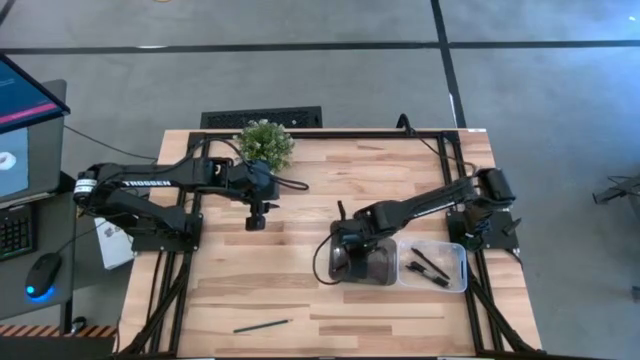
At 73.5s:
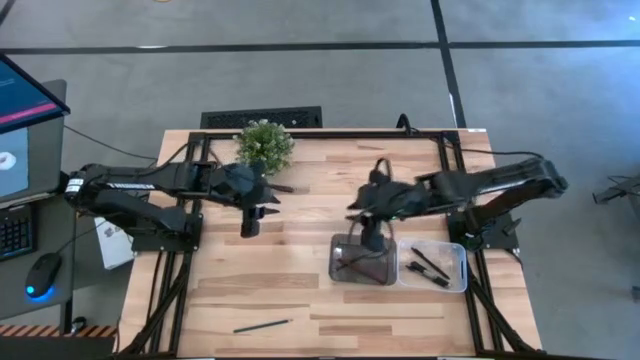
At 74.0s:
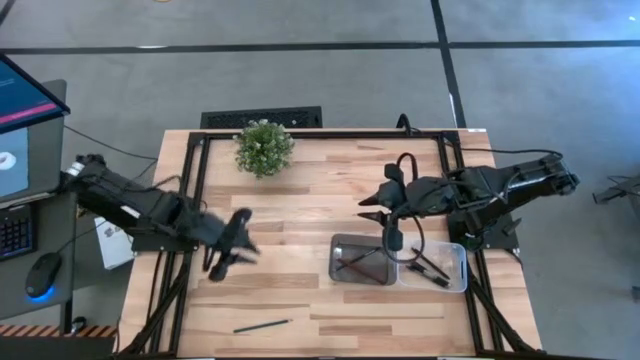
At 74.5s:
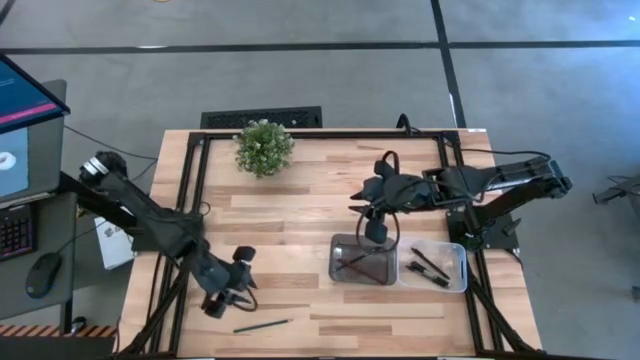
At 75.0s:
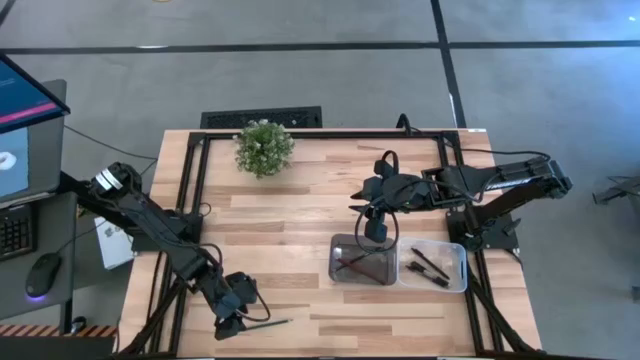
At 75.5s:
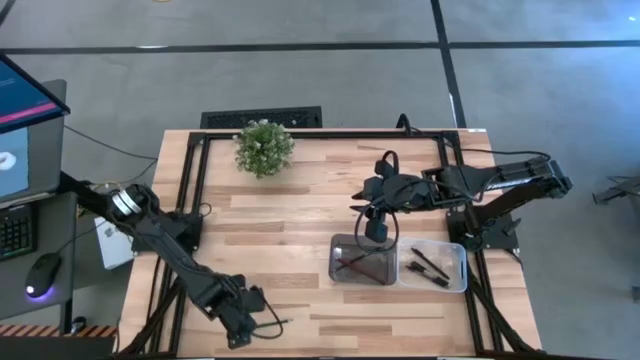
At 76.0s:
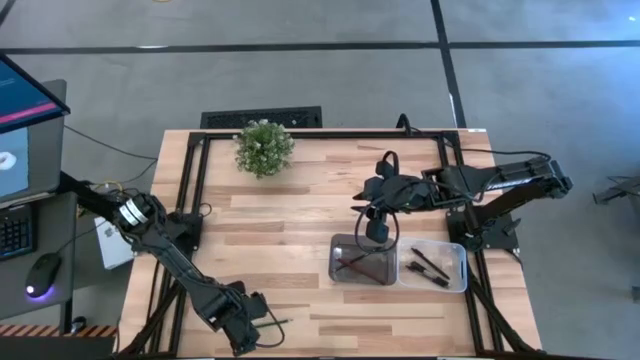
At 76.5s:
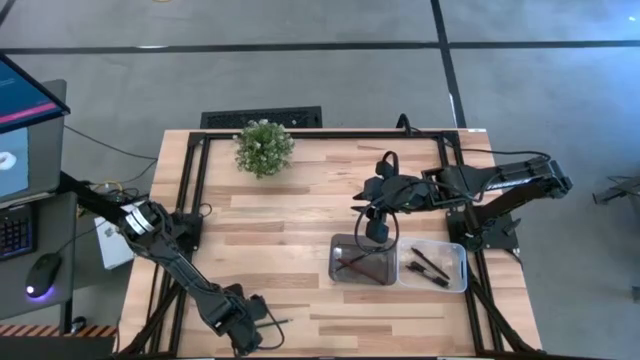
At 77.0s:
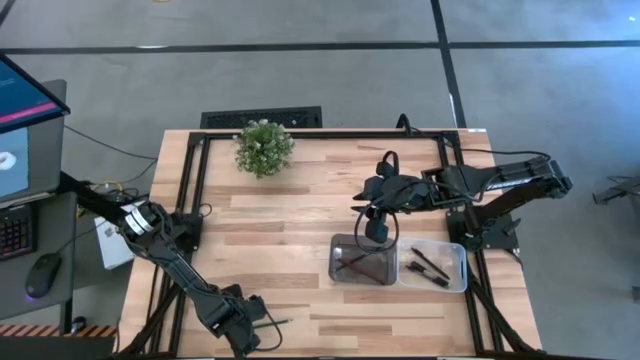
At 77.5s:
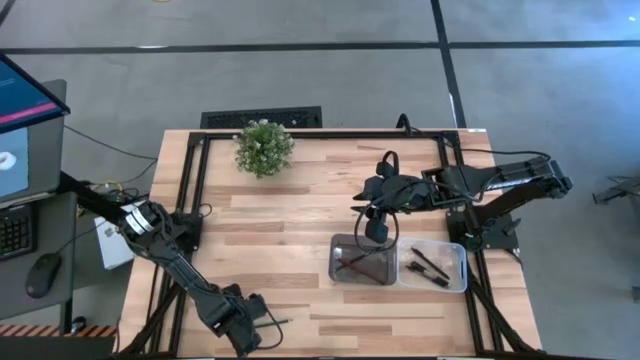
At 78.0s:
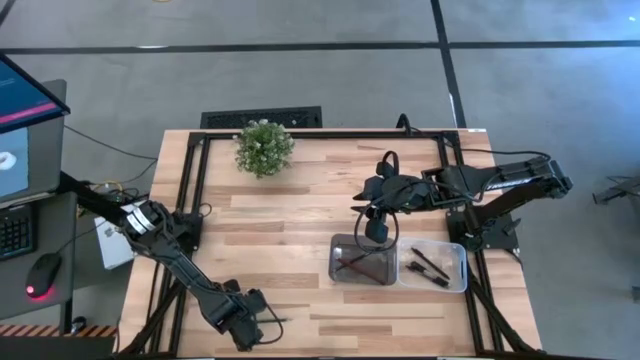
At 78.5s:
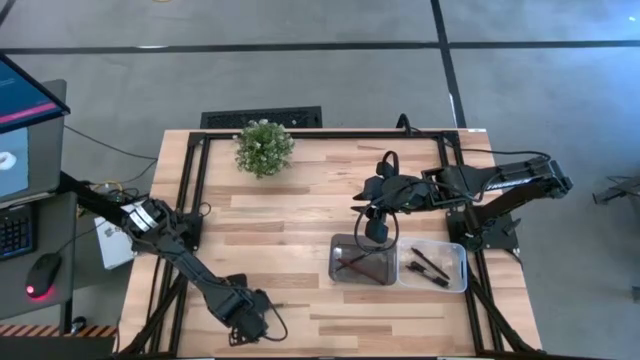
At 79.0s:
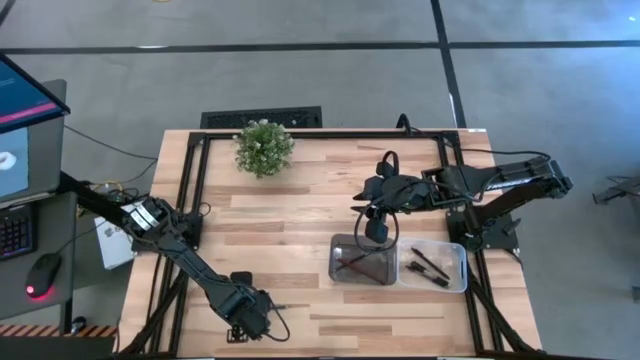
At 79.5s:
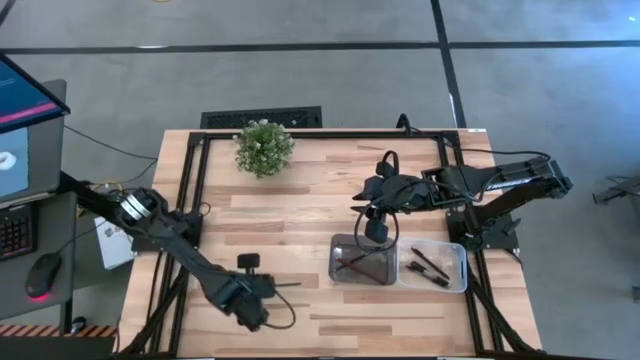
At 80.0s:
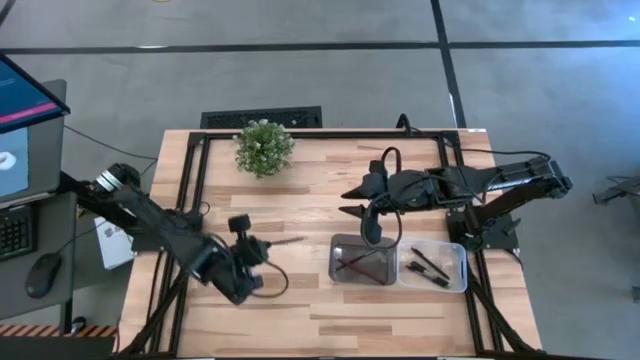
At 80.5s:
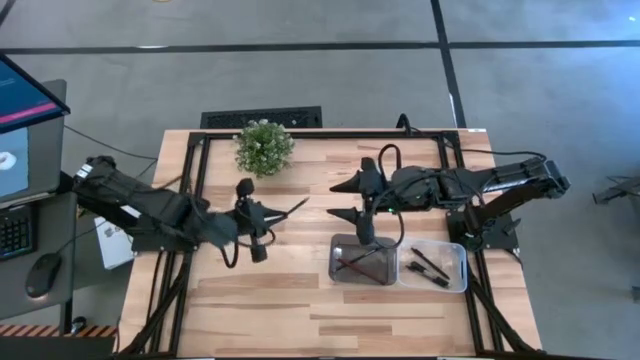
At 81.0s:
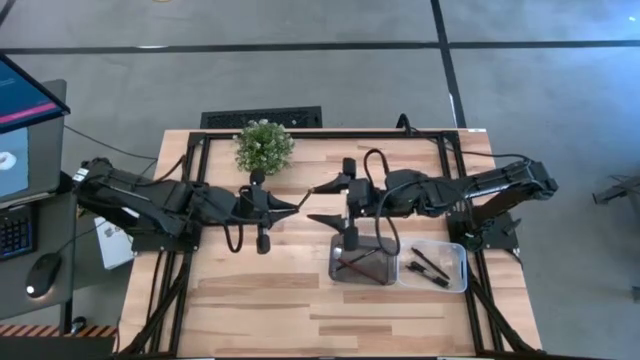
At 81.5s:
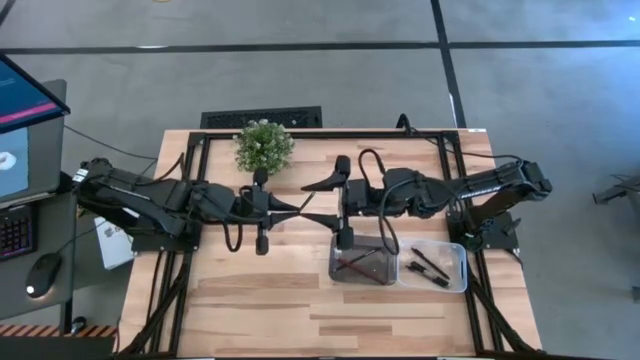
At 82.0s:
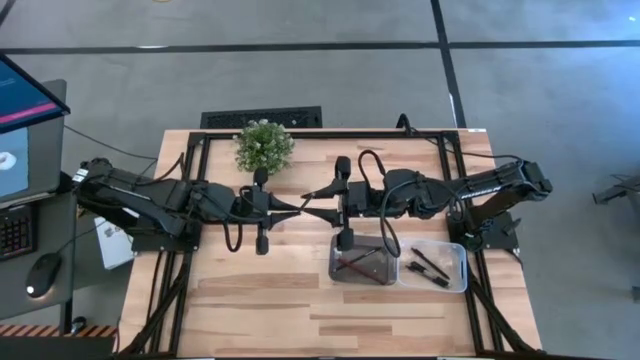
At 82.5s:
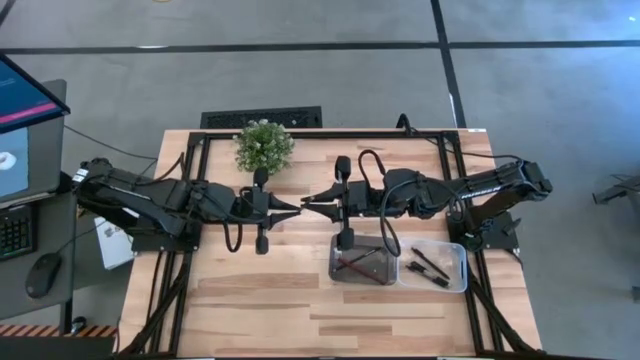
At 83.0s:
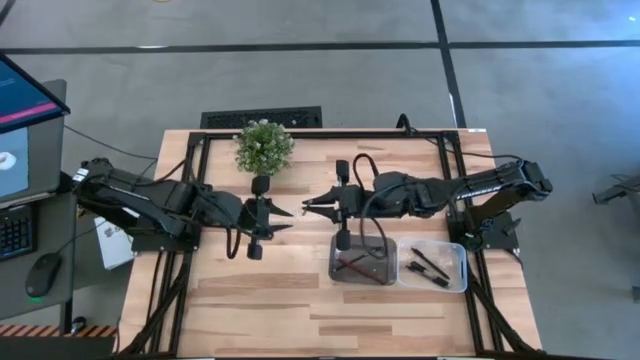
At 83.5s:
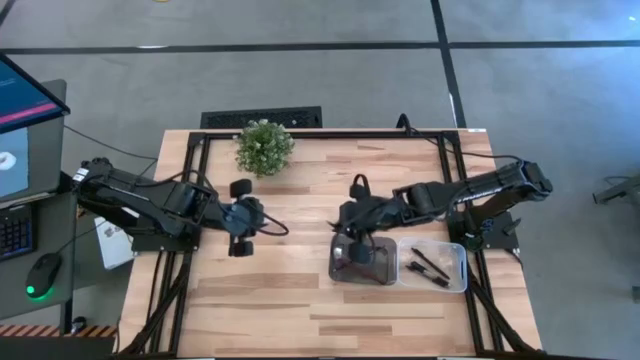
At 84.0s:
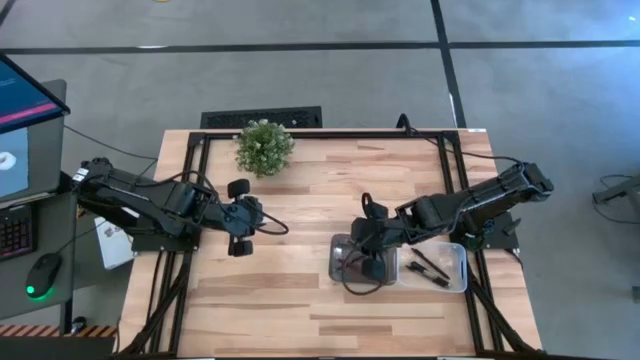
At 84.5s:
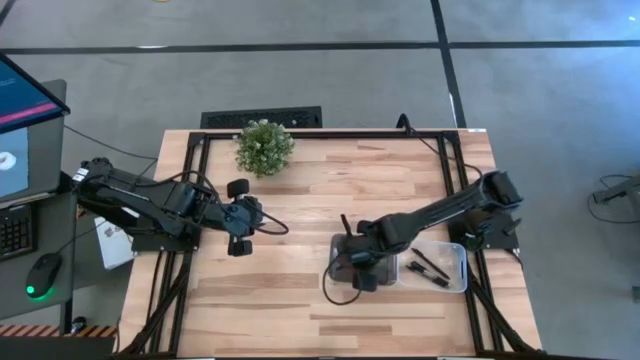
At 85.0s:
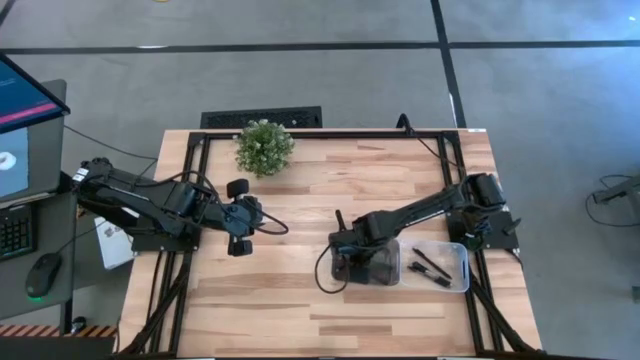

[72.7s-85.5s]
Task: Sort pens & pencils
Put the green pencil into the black bin

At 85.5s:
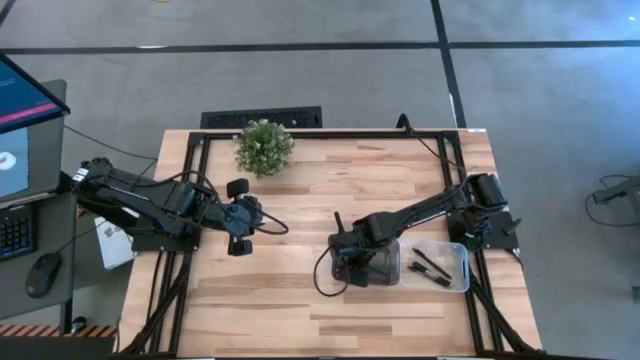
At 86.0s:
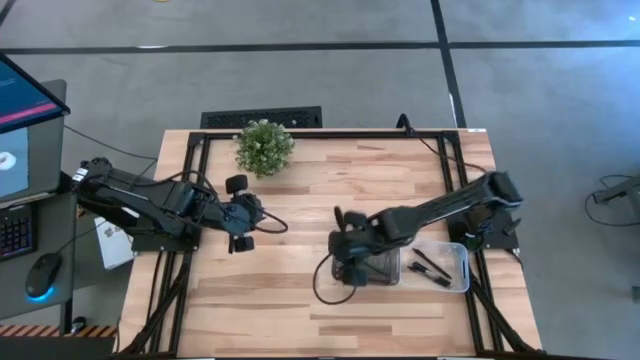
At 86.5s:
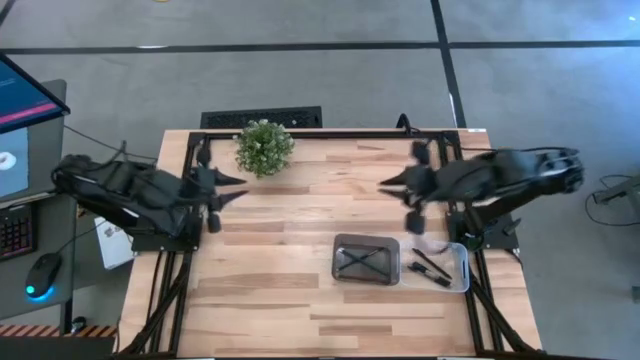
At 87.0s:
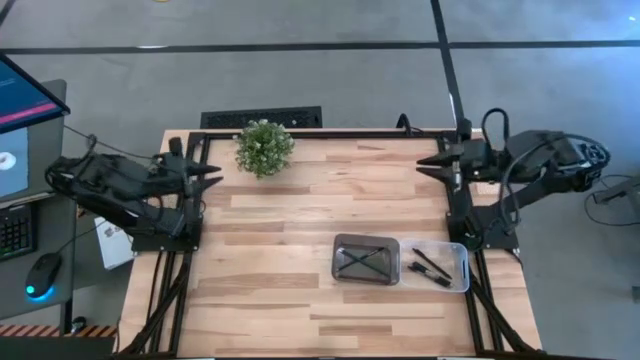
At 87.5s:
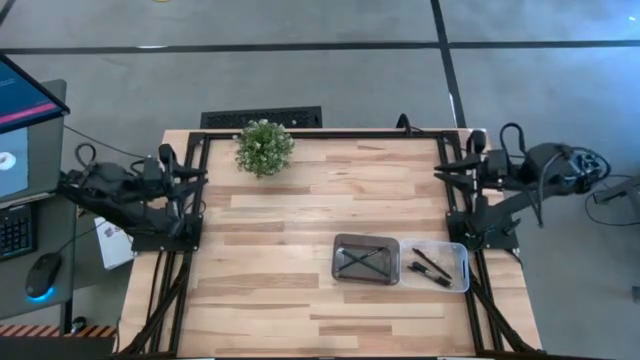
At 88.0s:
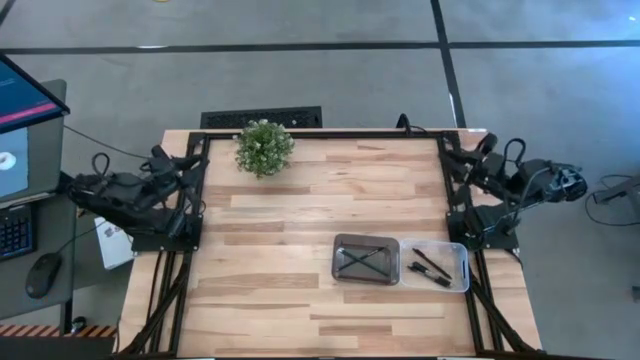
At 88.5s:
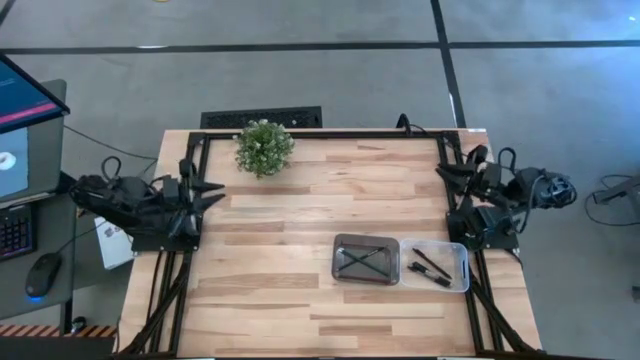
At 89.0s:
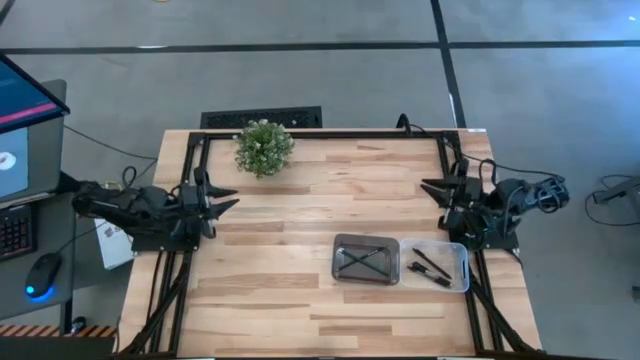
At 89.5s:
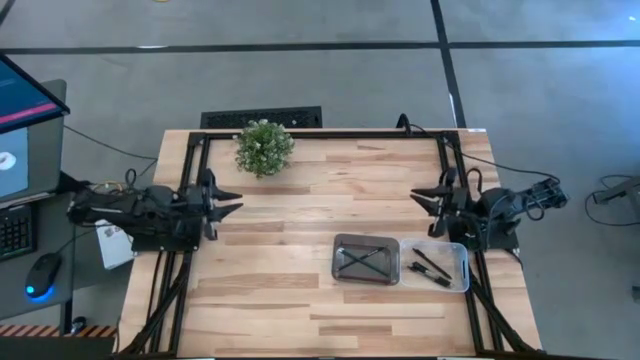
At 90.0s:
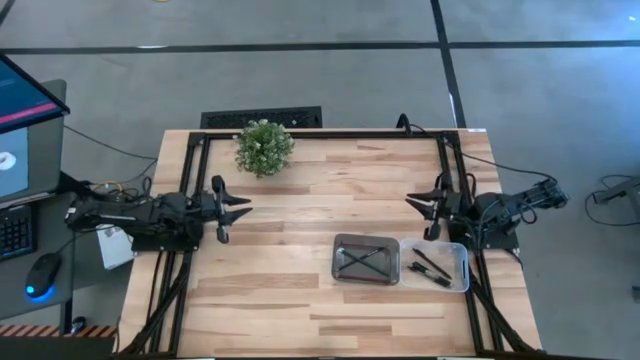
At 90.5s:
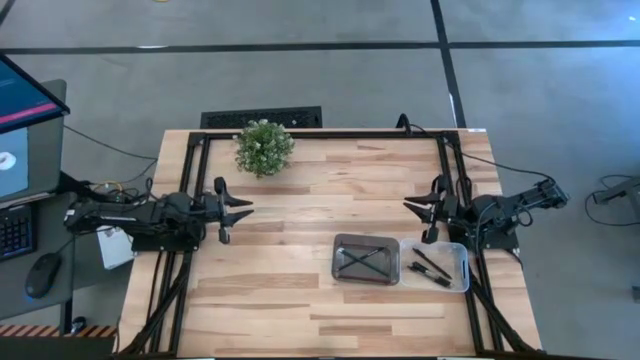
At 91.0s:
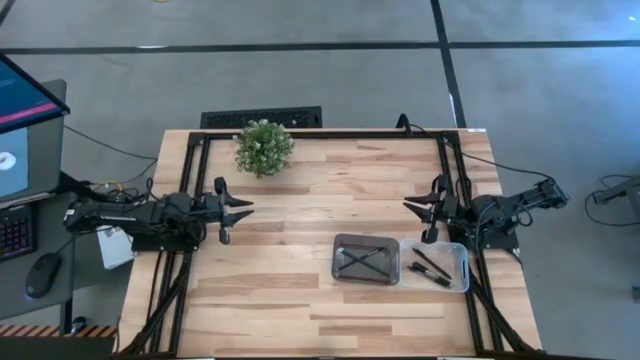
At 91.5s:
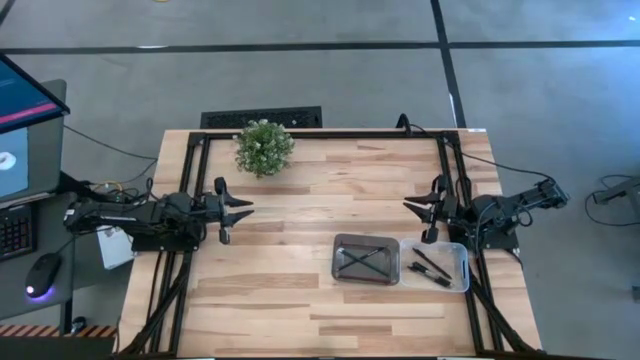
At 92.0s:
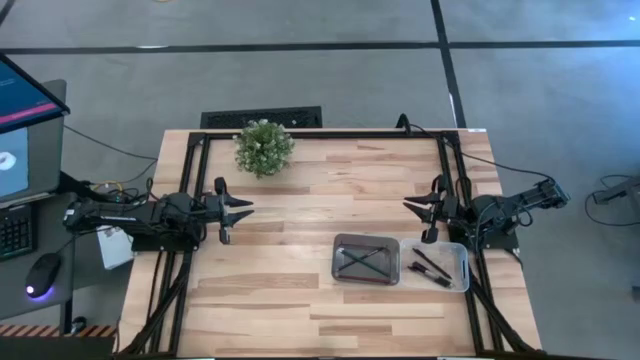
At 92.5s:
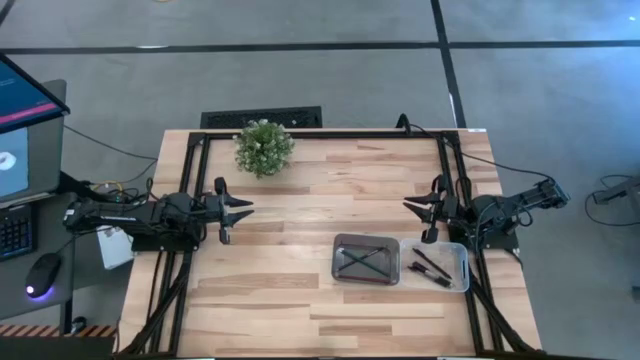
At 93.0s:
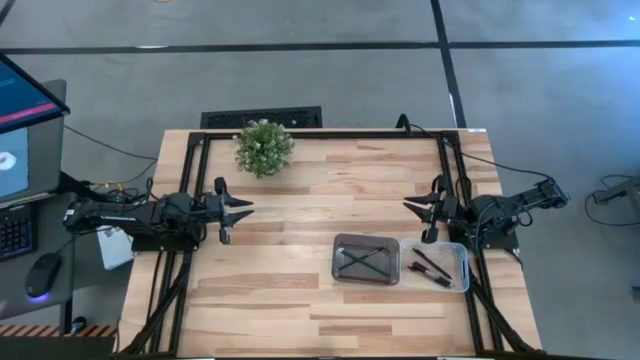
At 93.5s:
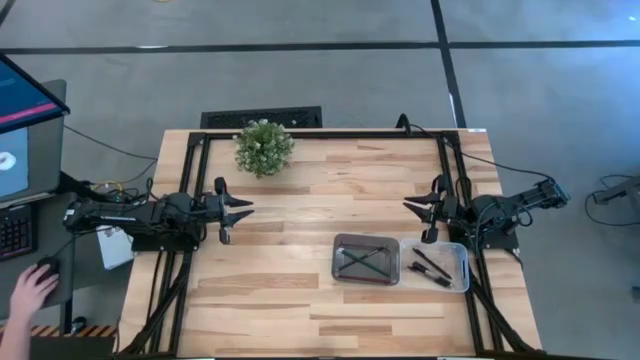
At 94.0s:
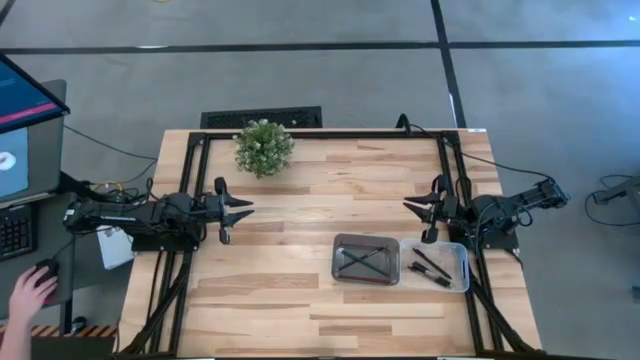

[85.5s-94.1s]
Return to Home Position
